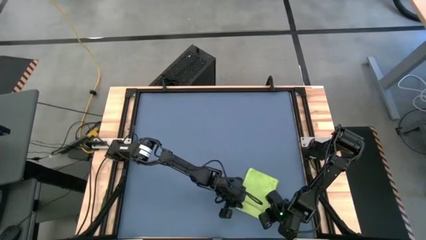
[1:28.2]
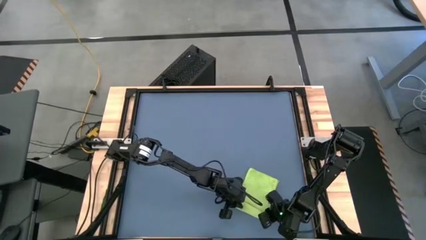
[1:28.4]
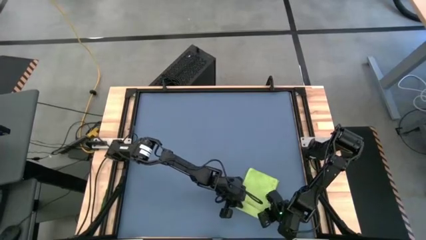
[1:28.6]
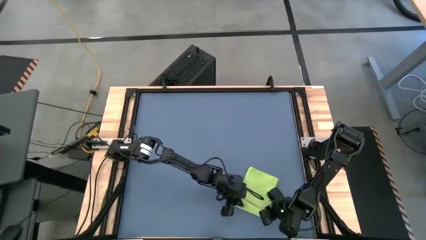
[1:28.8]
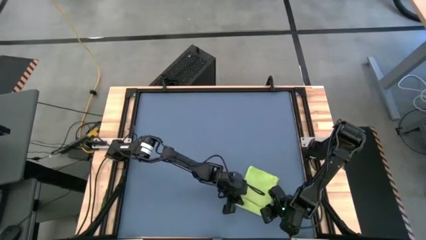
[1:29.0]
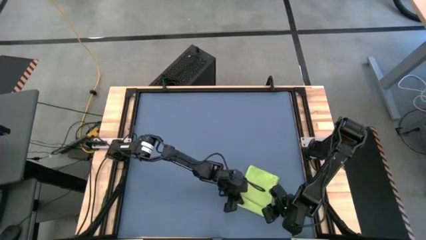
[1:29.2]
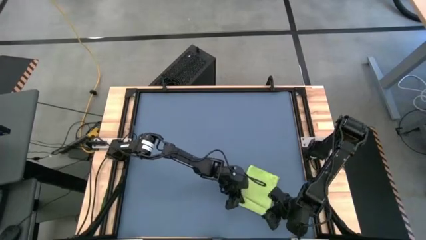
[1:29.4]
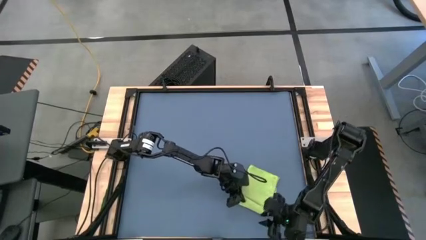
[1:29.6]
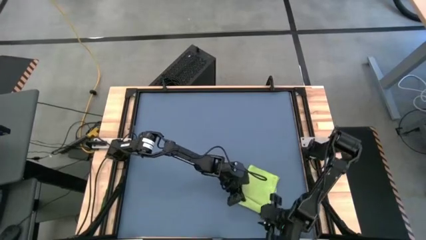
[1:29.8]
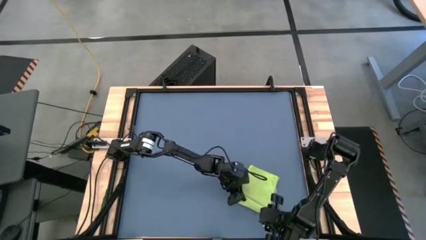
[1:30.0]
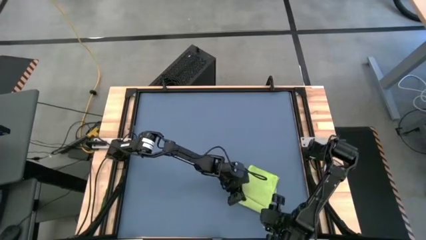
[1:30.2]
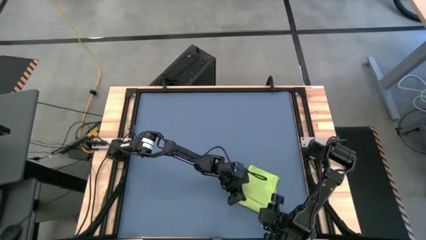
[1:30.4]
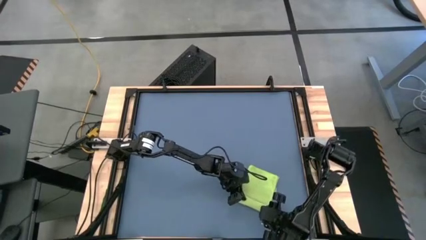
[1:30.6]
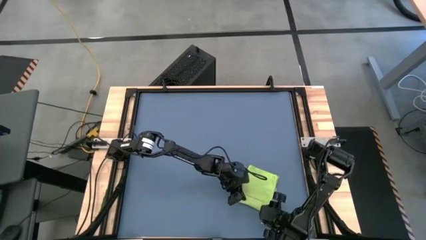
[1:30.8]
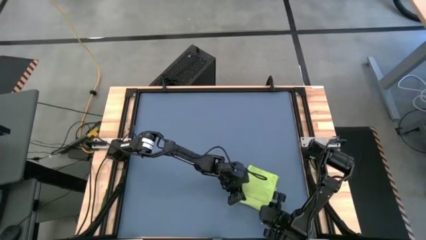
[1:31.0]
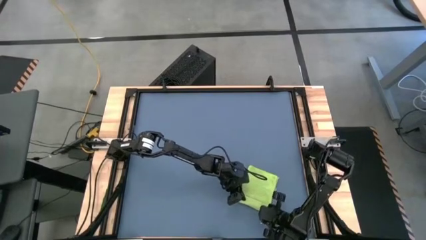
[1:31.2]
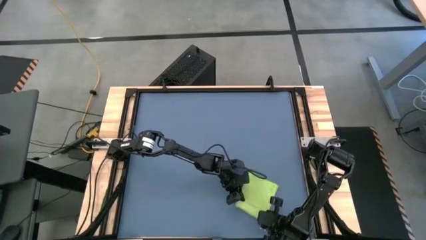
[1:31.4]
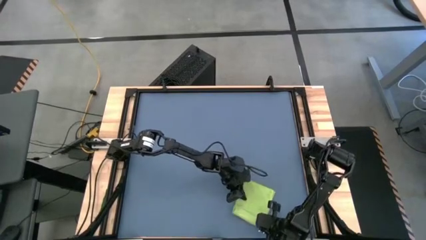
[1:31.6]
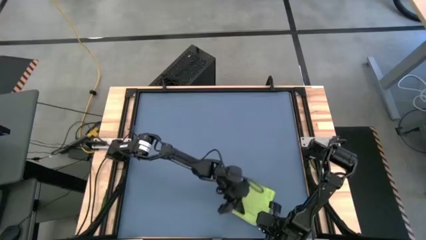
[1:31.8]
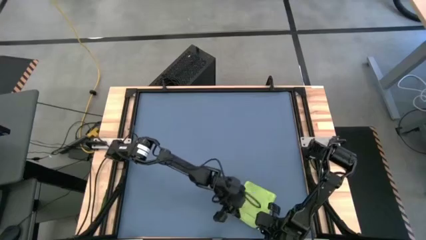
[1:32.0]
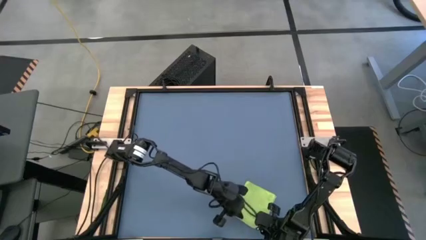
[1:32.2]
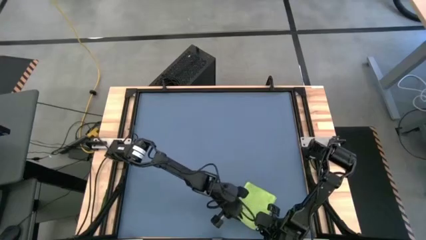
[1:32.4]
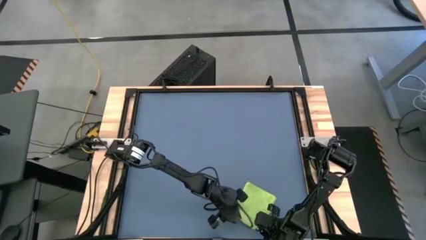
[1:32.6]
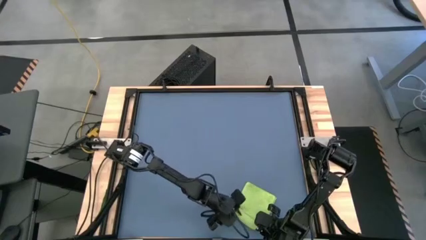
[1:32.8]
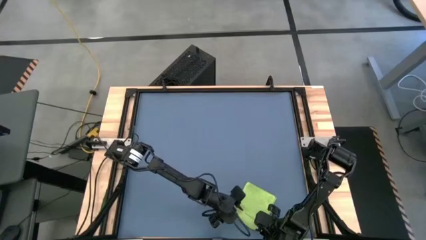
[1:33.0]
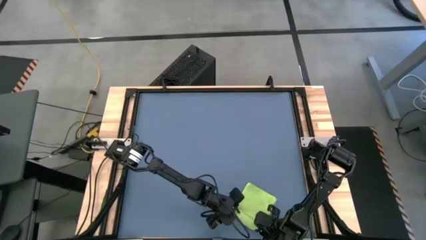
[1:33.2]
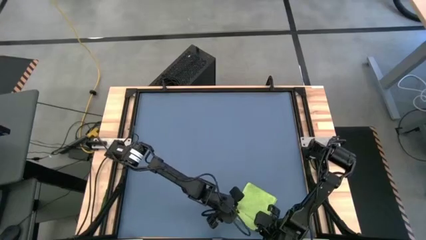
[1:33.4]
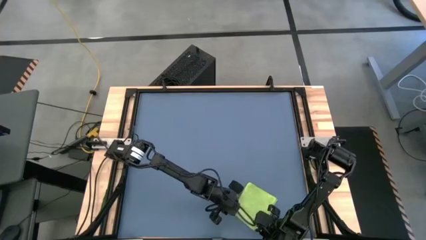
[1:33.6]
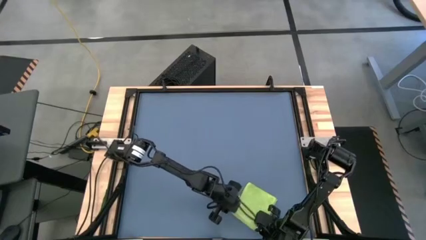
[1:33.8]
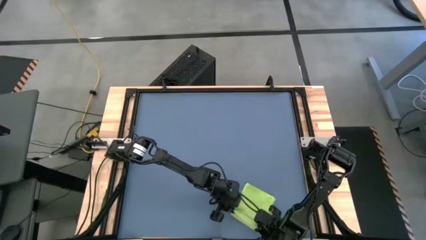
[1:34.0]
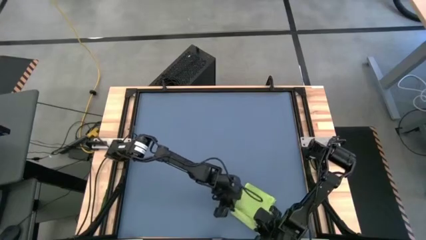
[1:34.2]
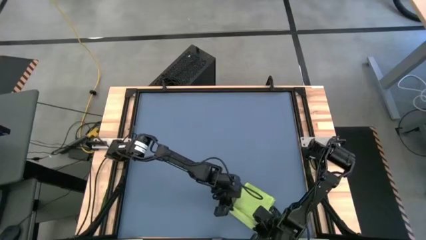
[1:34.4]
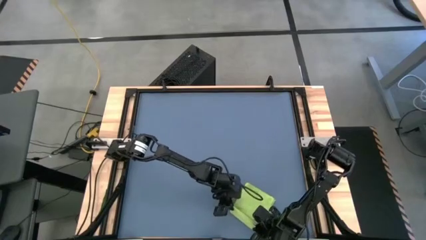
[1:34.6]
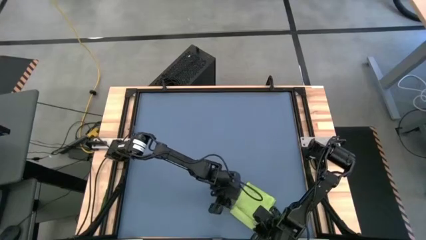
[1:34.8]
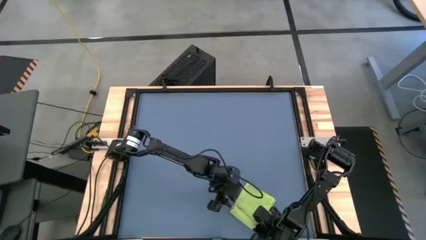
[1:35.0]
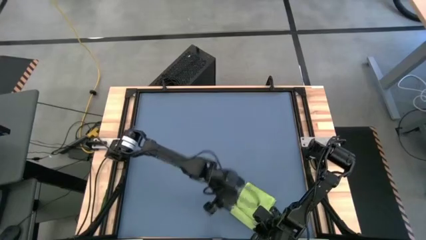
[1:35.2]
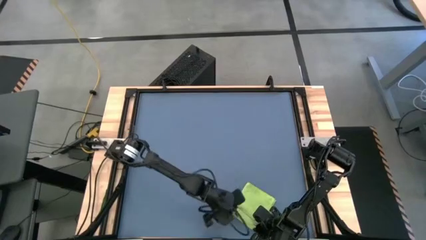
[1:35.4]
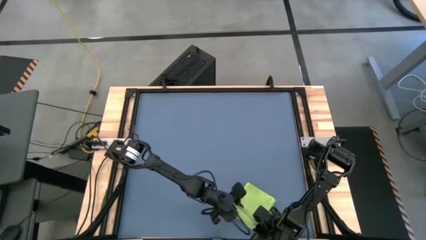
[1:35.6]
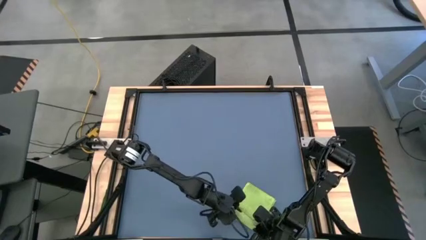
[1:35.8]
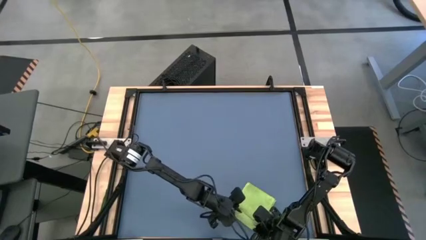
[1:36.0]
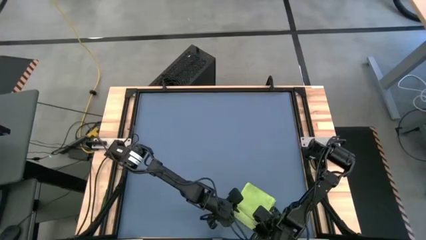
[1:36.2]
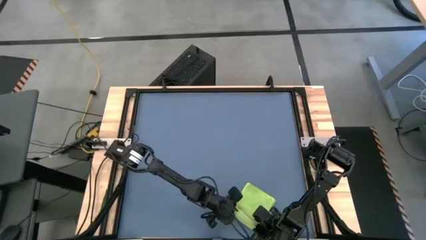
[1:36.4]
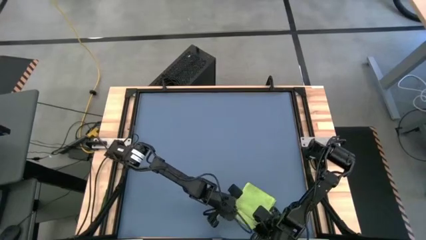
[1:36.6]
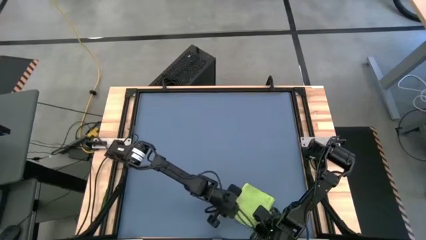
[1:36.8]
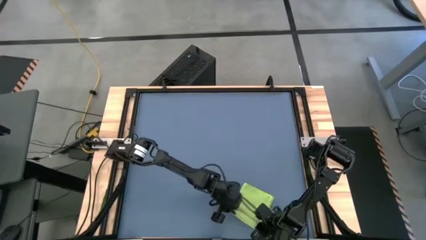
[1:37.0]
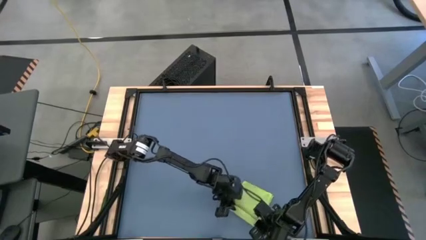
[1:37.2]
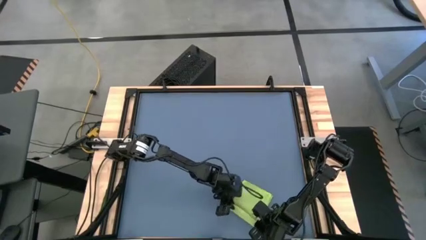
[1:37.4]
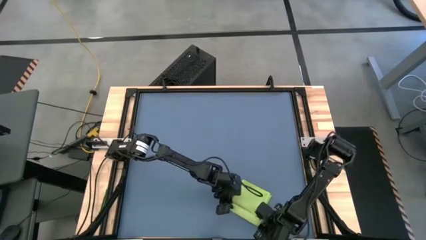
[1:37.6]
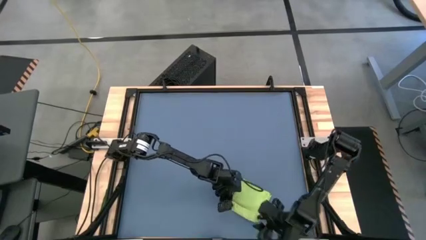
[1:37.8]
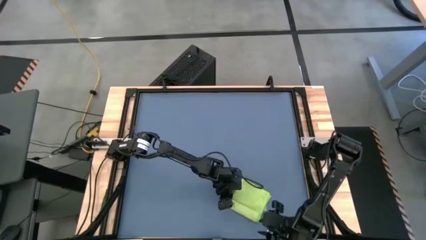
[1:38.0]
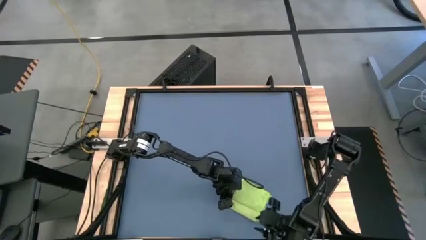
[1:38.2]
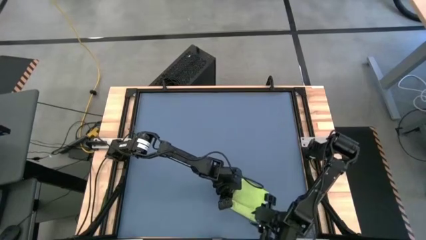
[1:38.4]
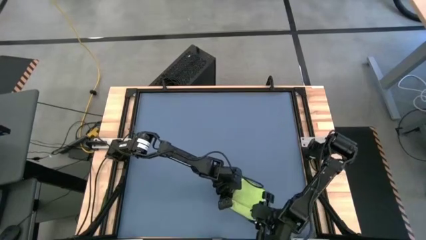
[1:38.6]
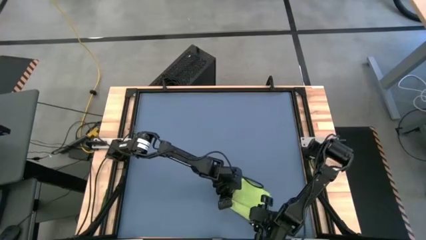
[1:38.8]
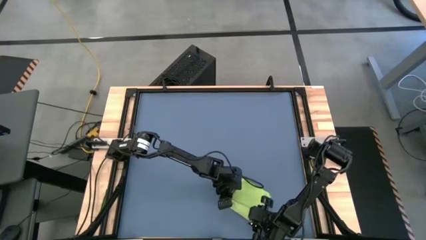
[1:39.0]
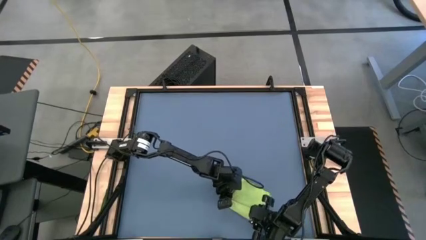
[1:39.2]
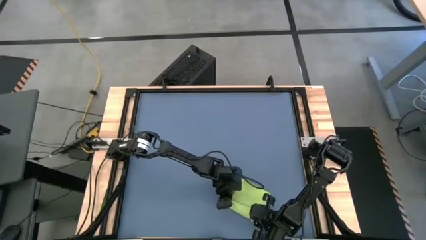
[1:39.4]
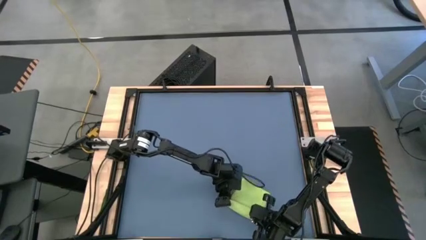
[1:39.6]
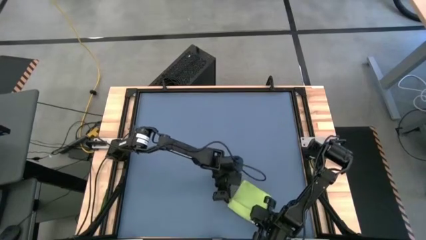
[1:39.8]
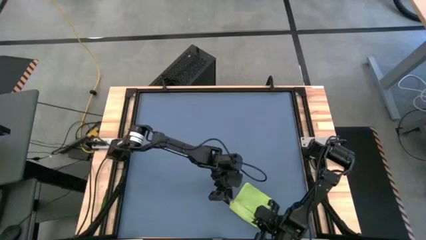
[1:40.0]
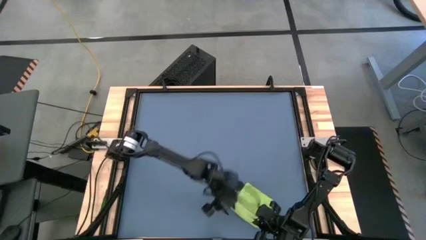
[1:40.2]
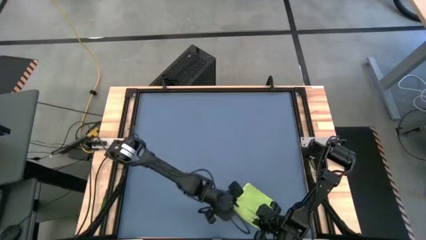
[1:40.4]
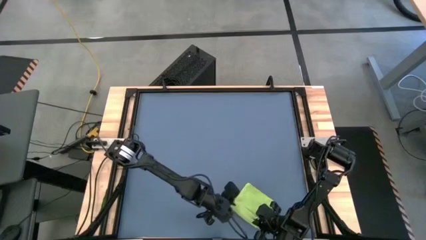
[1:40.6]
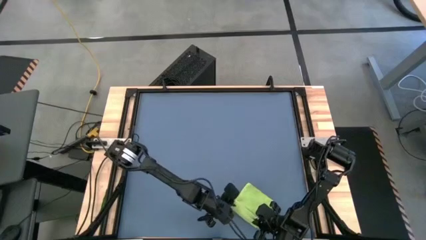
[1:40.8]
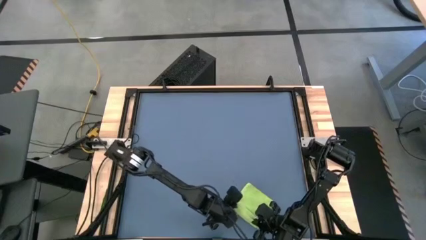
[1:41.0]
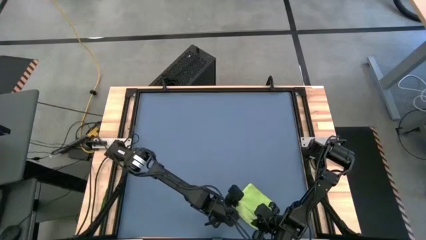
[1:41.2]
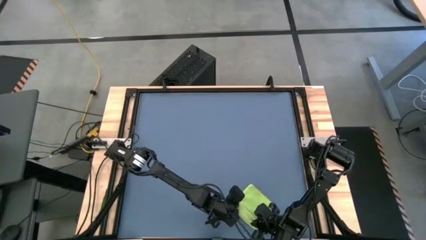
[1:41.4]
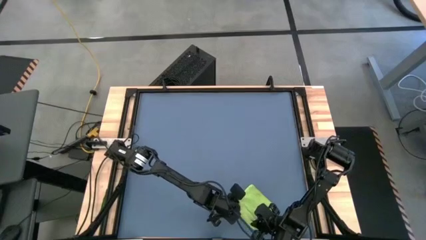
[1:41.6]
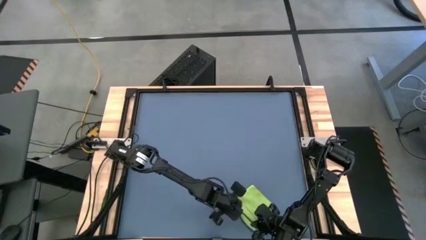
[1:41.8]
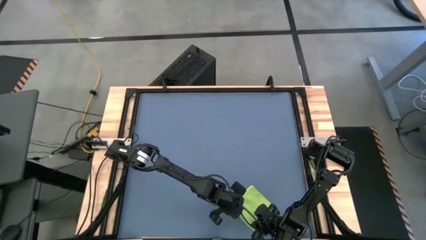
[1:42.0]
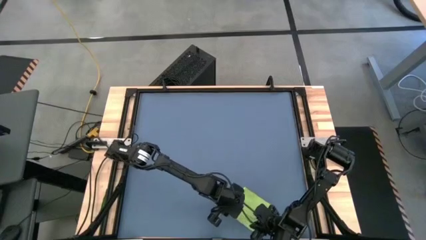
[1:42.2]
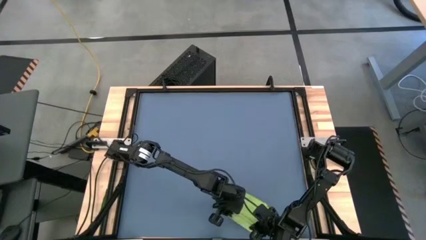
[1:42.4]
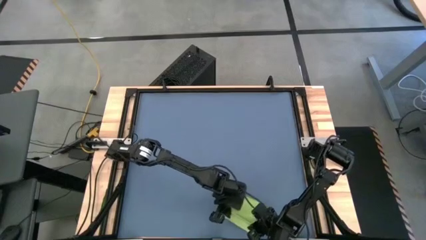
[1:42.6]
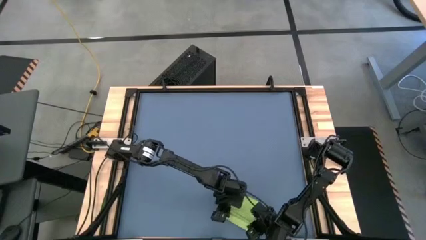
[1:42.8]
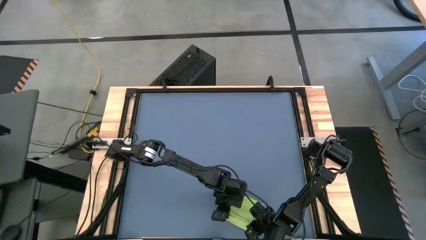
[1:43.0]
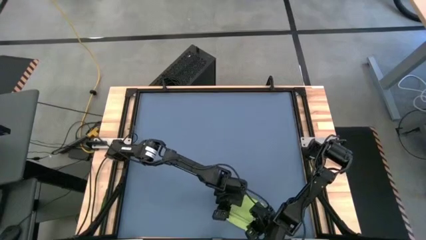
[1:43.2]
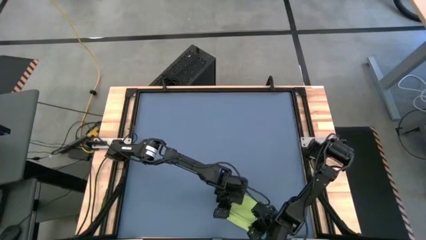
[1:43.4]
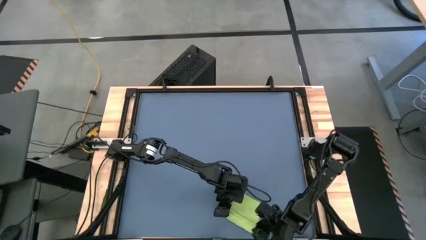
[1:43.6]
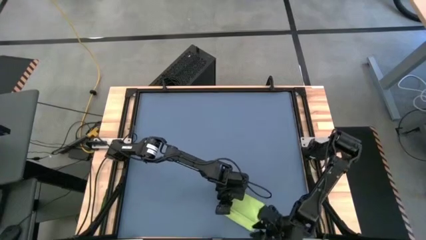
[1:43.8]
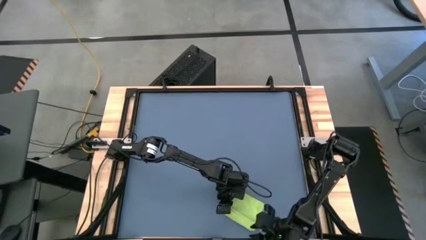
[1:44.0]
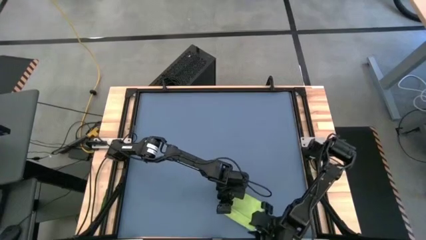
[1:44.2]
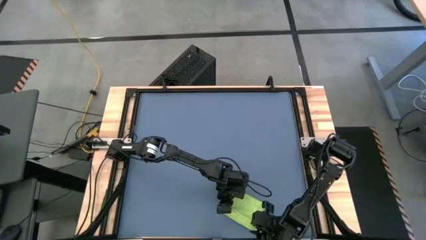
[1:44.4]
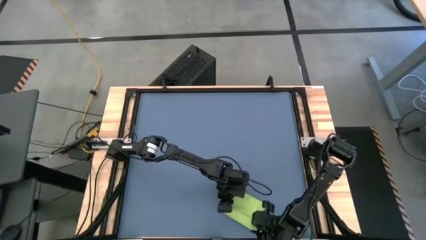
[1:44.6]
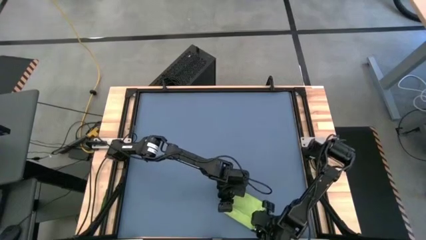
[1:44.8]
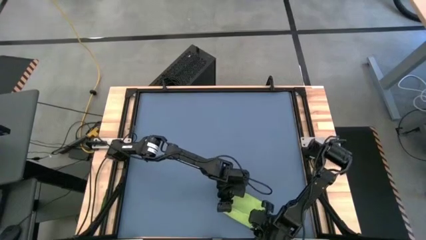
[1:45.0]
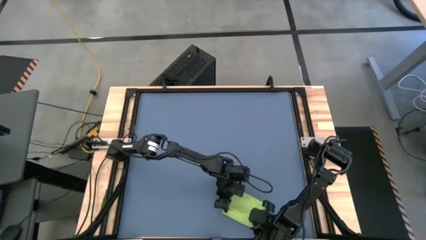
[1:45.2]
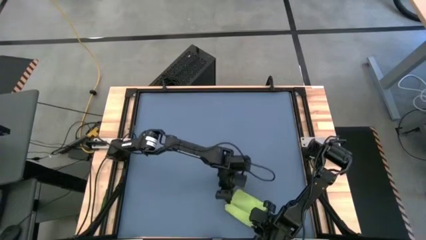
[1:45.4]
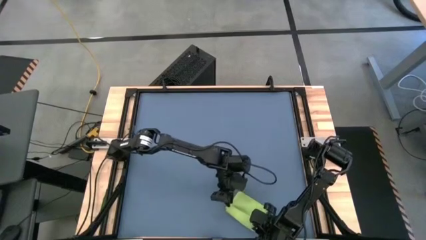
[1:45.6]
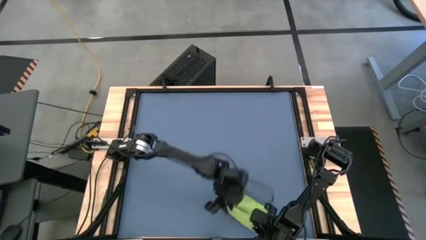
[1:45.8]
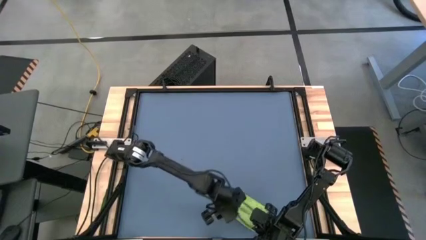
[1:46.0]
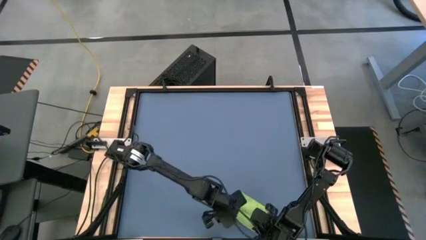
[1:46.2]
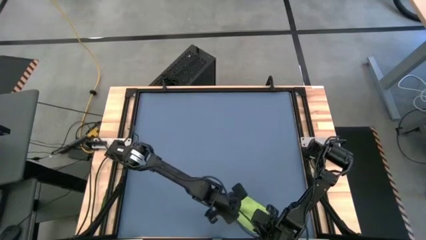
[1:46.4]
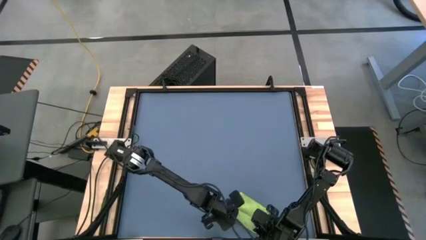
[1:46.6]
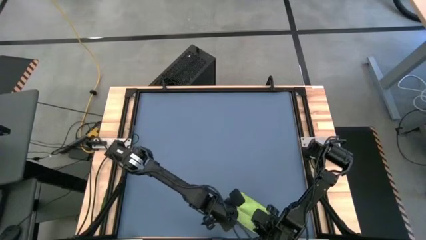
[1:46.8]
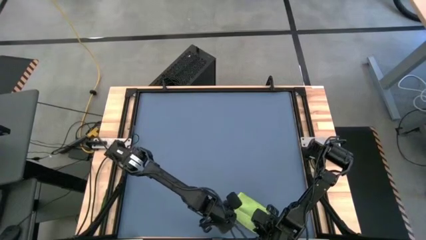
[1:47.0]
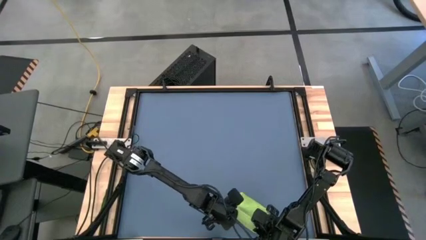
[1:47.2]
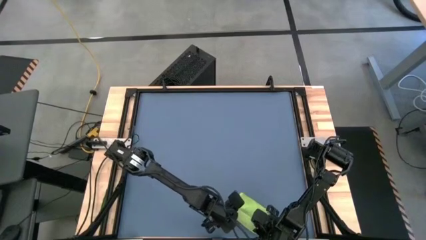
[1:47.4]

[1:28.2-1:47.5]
Task: Roll towel
Roll the green towel
